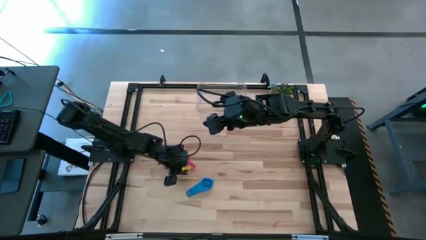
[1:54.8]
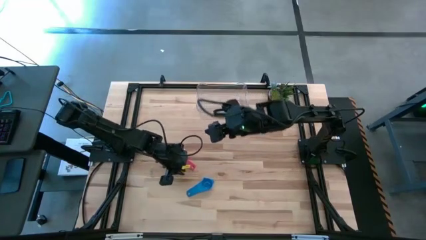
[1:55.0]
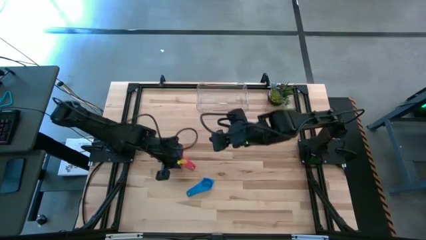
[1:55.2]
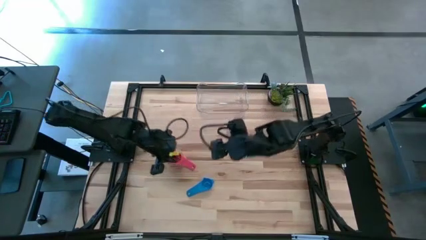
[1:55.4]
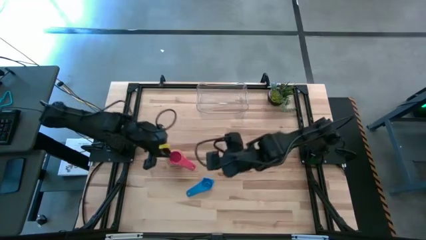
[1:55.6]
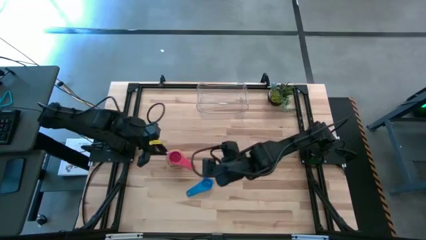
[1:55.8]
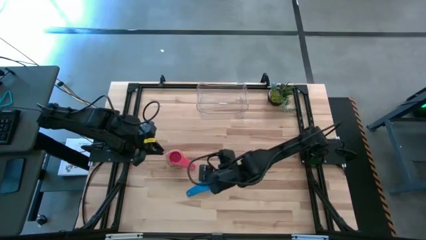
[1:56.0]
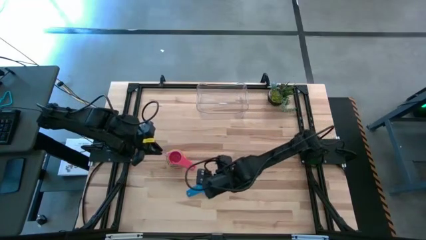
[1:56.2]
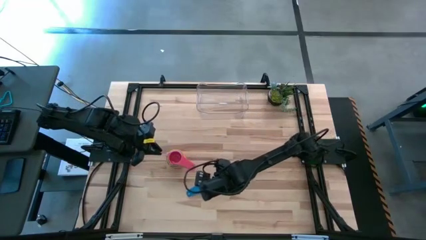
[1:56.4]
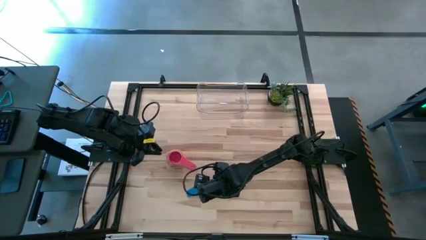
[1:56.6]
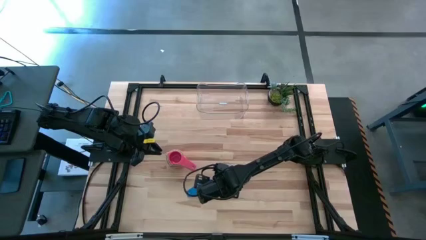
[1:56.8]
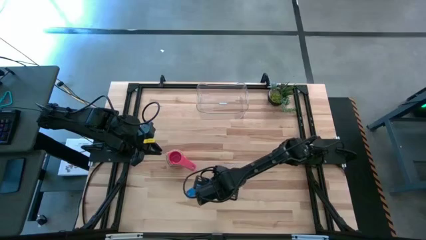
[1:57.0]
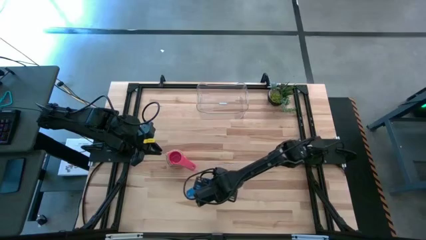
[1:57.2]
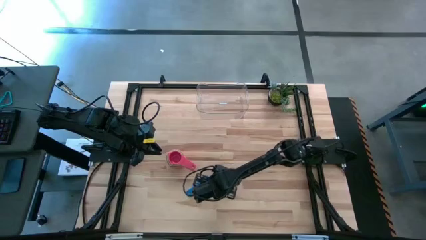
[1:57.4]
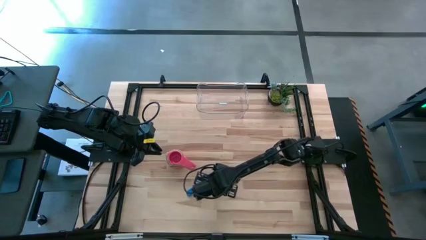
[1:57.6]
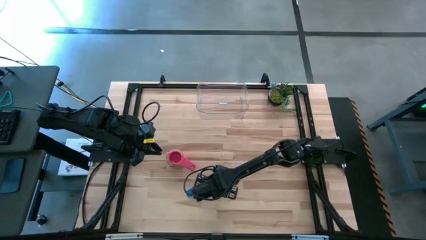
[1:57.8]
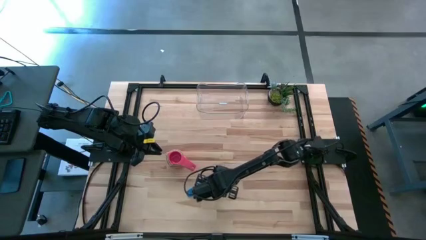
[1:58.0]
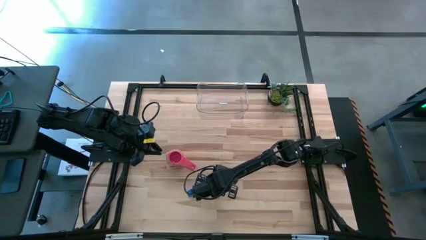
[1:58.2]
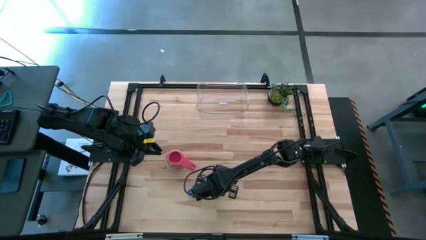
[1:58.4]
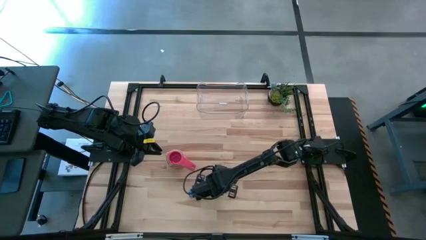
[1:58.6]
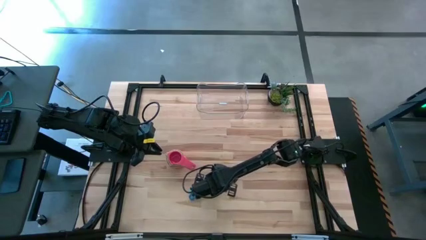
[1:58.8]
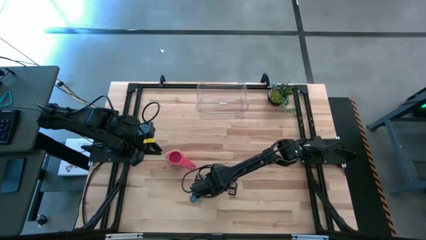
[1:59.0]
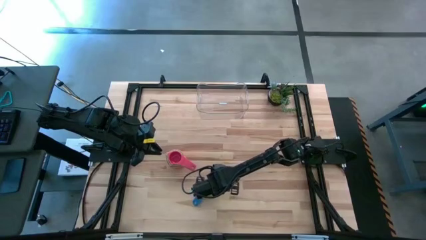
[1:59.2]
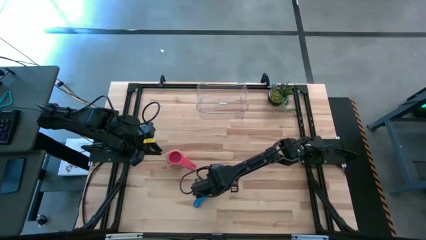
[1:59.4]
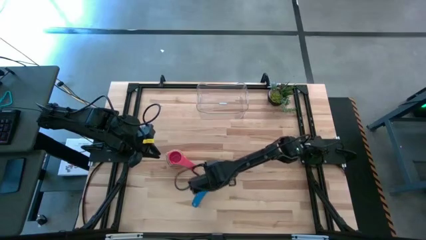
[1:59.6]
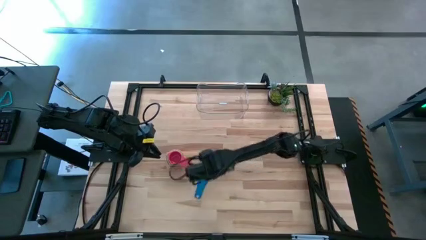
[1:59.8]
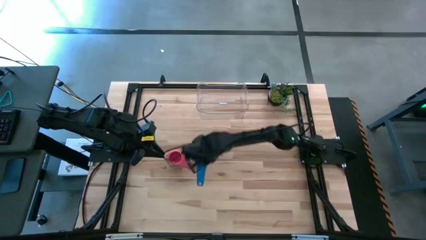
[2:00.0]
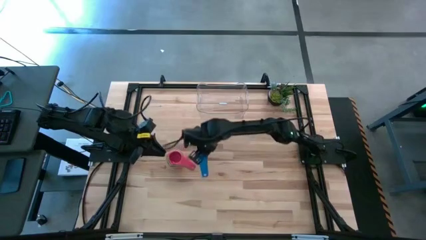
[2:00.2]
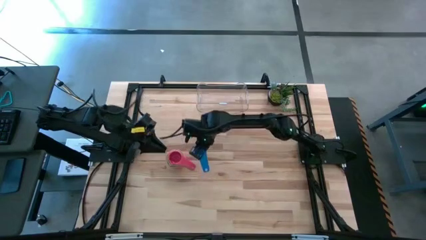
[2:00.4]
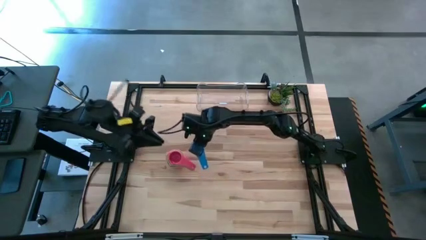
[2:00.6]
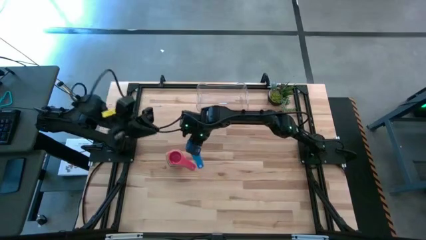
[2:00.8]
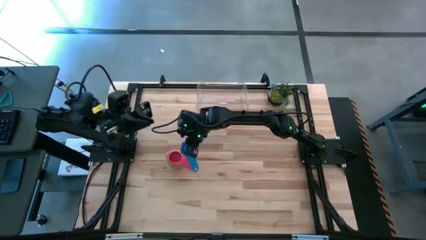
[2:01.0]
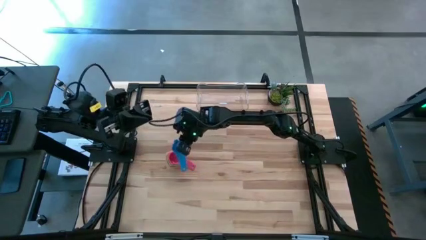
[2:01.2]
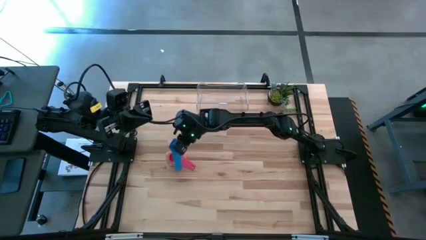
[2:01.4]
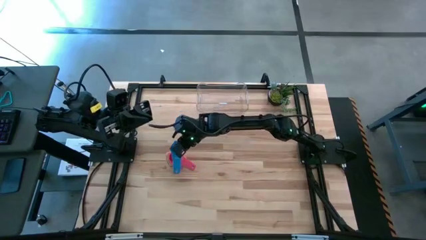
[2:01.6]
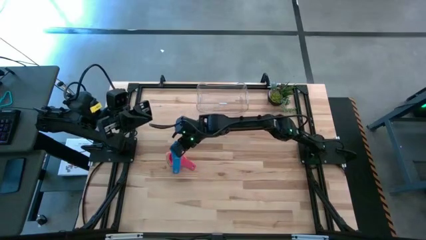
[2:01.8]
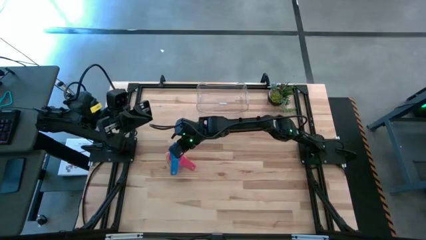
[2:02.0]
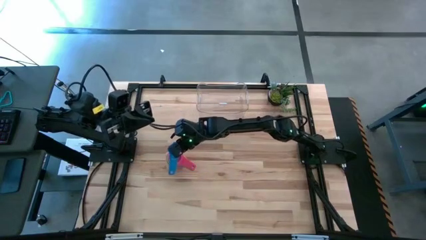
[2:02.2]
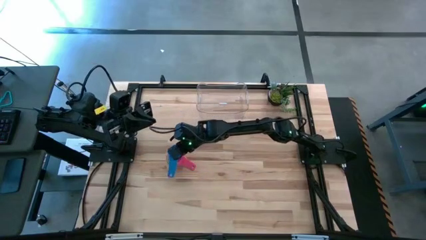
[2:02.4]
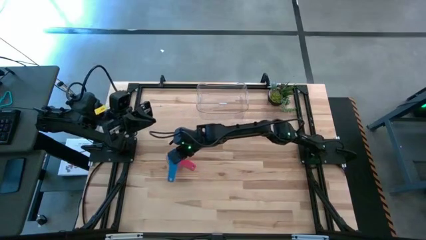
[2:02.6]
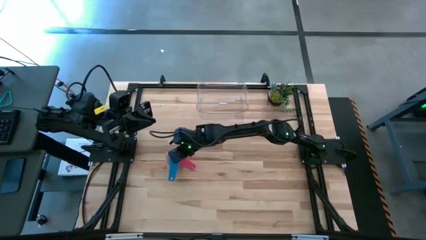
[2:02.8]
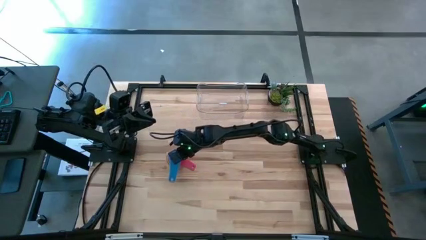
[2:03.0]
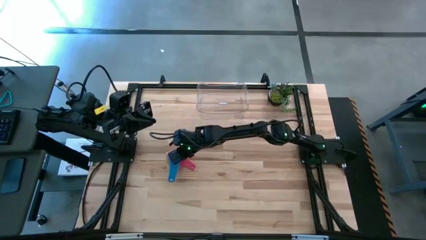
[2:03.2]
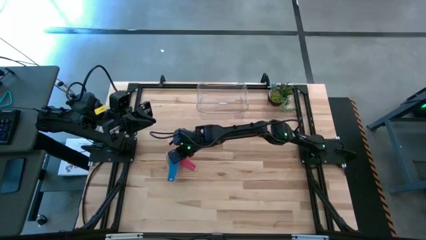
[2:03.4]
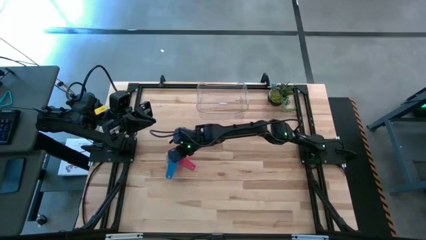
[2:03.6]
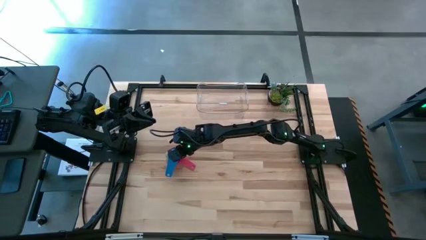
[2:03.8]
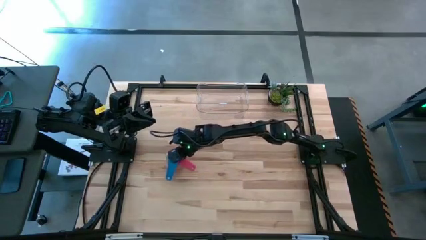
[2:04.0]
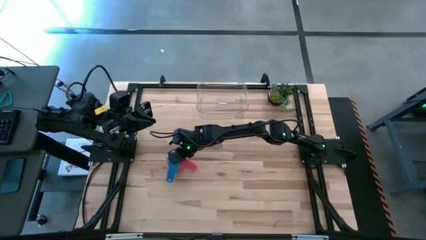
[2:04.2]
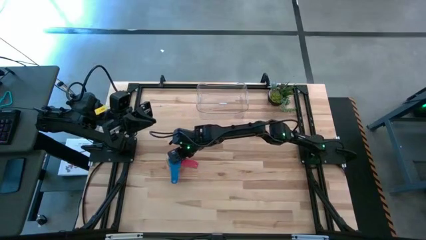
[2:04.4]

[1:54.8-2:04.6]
Task: Nest measuring cups in basket
Stack the blue measuring cup on top of the red measuring cup

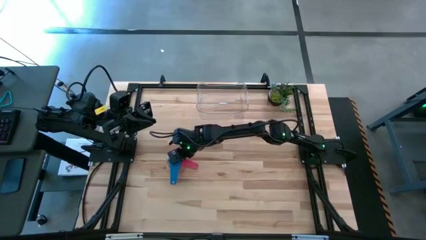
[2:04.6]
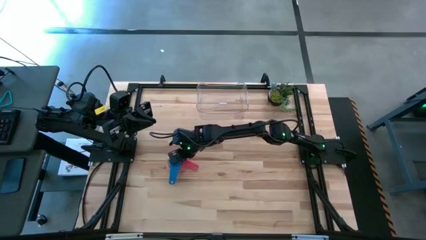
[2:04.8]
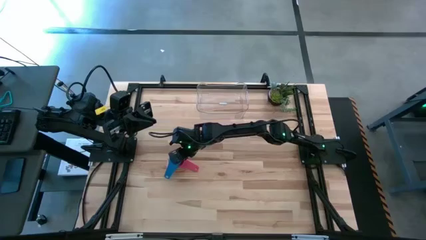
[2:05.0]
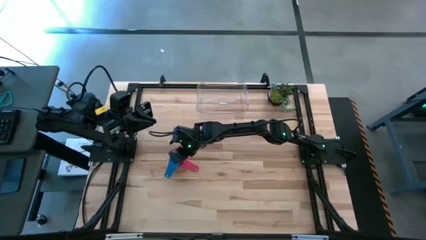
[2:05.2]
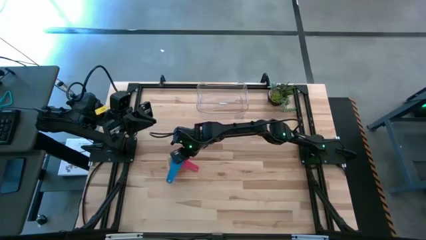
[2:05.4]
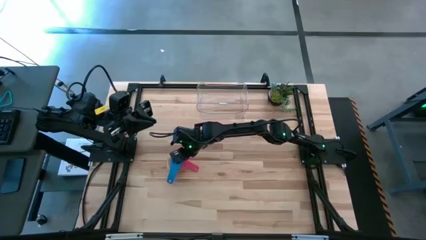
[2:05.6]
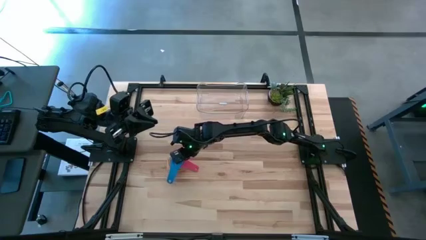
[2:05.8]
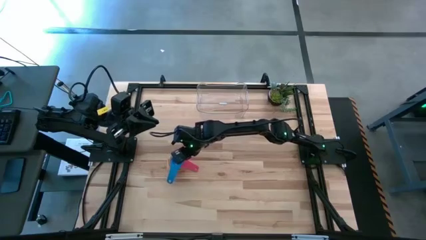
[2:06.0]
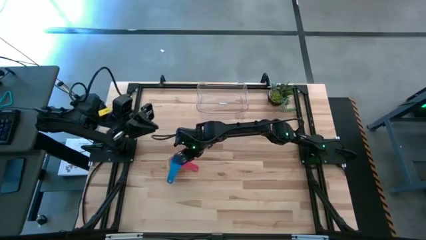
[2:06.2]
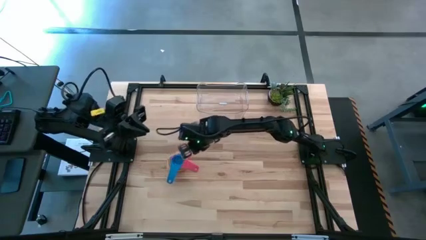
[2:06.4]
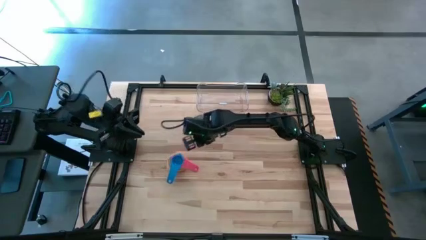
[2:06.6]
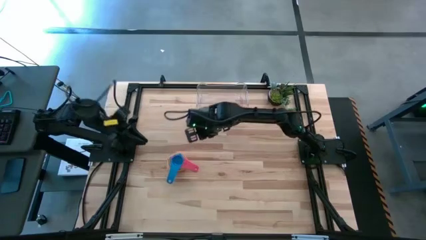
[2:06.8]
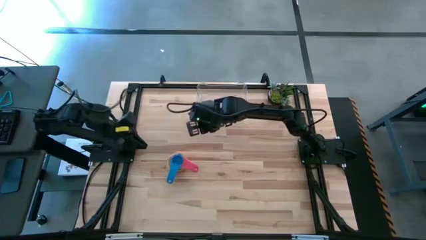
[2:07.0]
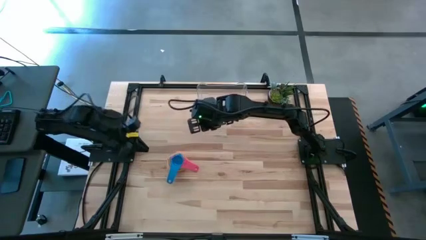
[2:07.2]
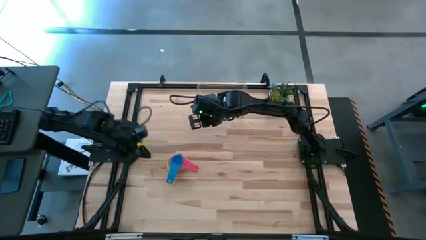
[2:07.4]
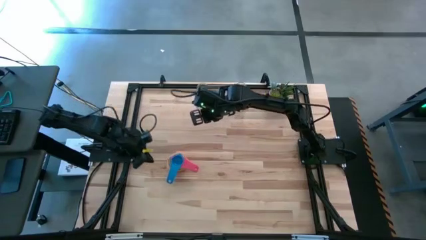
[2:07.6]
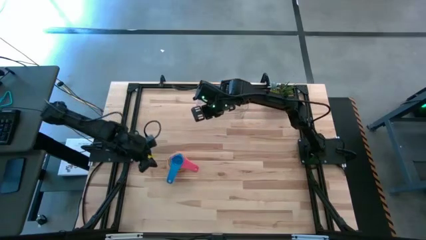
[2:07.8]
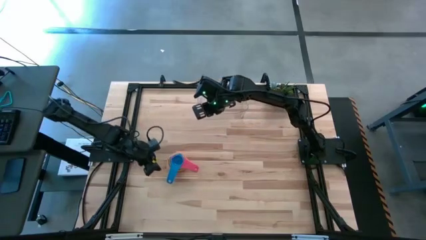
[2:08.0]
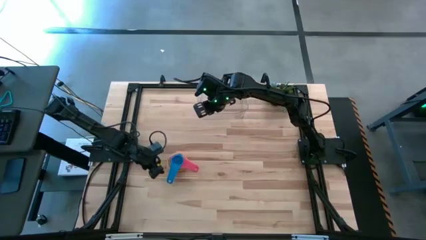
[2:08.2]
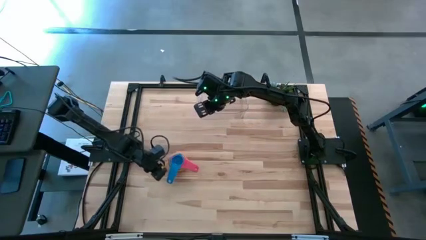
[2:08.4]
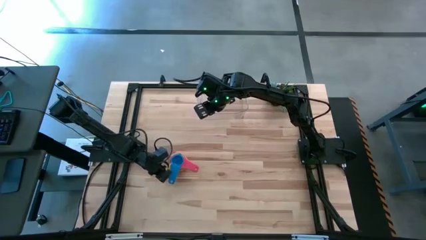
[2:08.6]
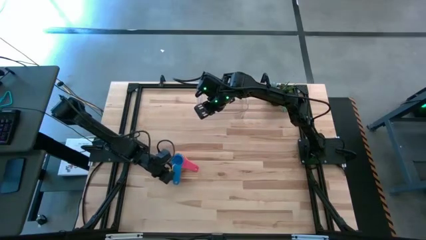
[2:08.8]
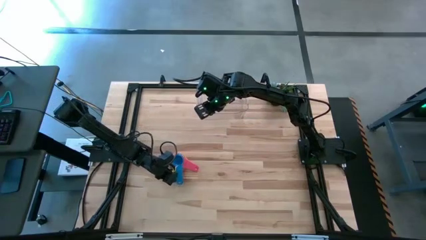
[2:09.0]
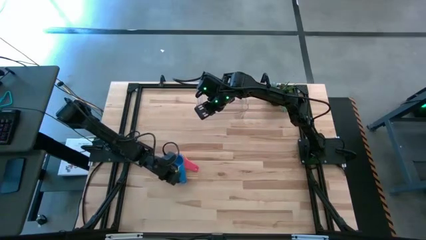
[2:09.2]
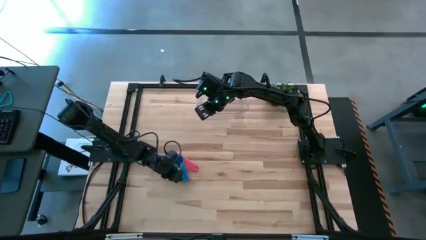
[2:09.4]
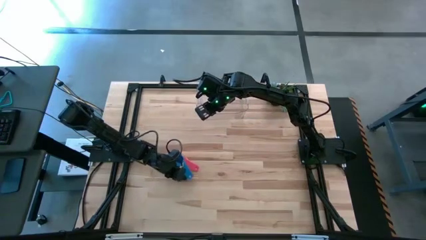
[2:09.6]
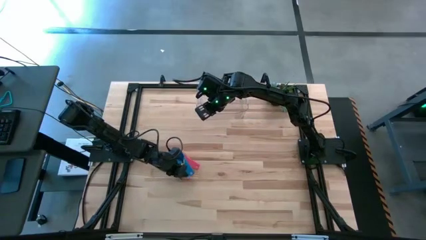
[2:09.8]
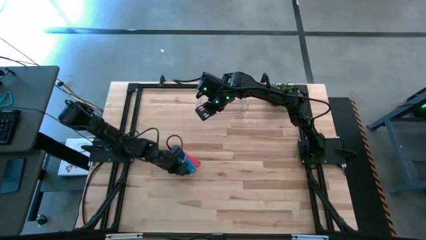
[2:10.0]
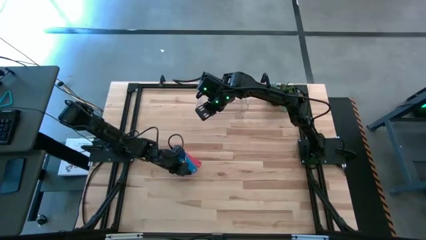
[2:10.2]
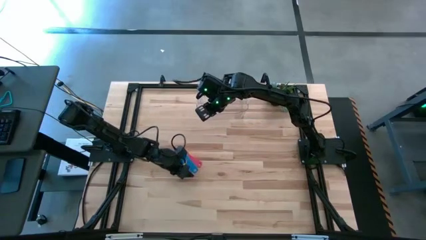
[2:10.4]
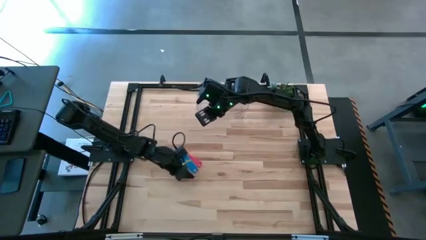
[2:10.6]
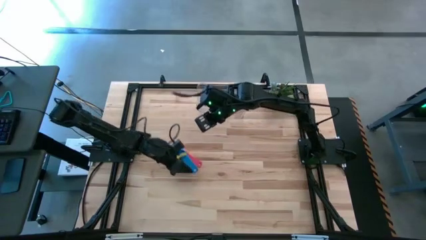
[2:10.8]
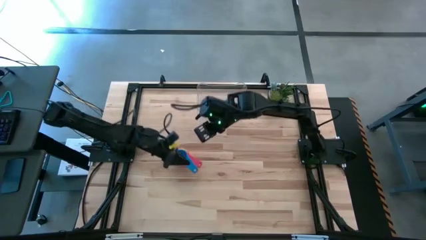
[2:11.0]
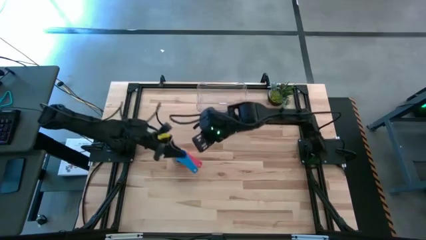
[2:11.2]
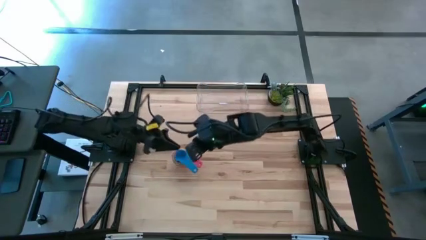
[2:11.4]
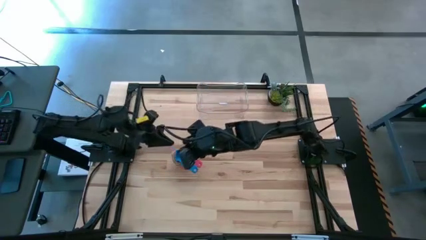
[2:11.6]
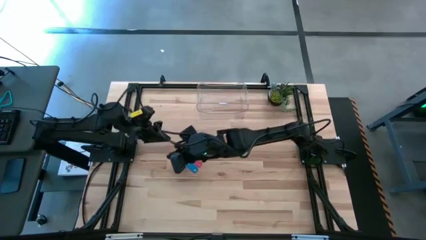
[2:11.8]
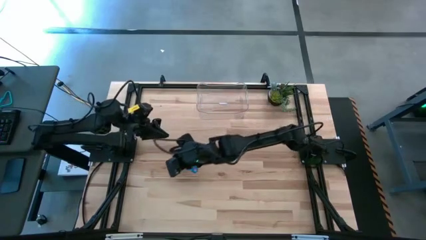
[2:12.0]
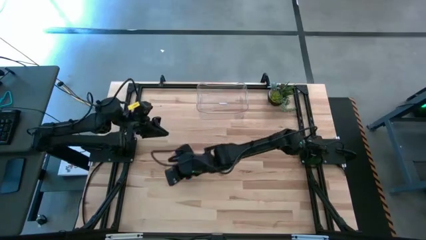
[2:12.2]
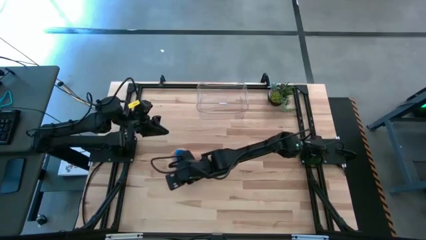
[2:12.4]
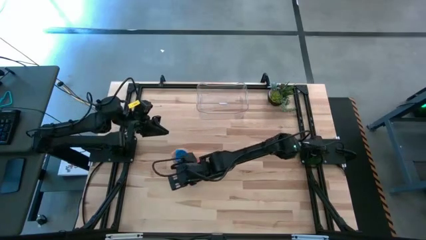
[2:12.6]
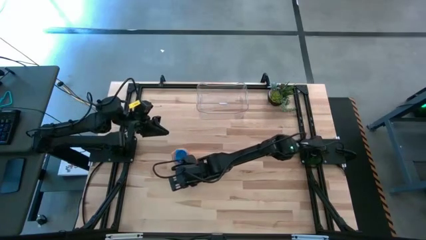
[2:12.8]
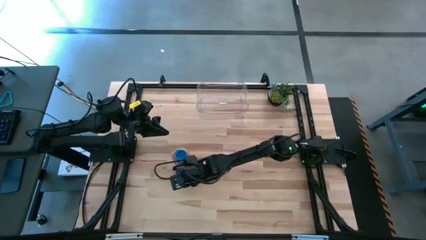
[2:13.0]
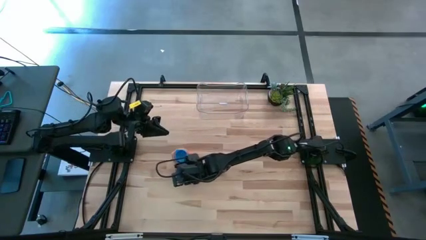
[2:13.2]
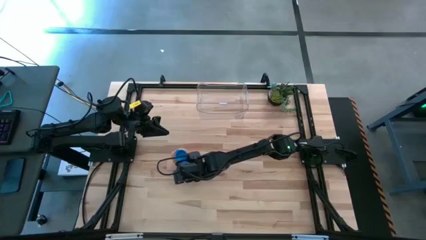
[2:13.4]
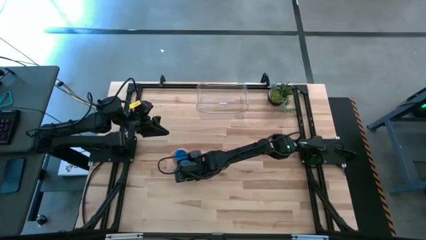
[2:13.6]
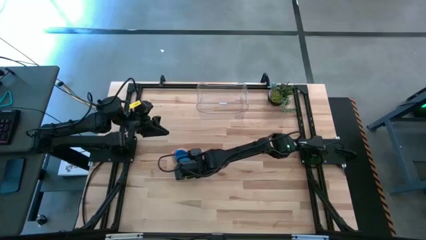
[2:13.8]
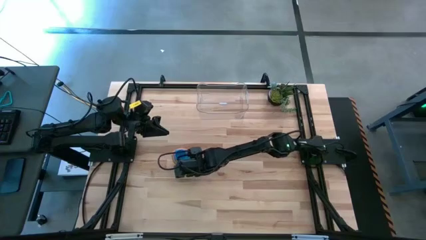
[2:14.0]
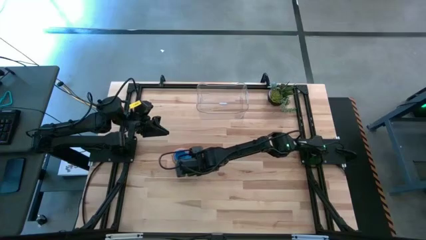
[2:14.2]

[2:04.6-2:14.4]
Stack the blue measuring cup on top of the red measuring cup
